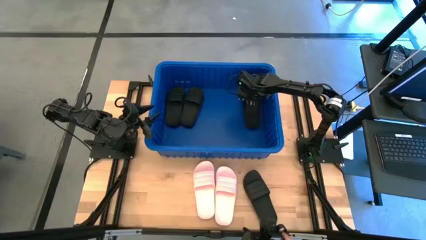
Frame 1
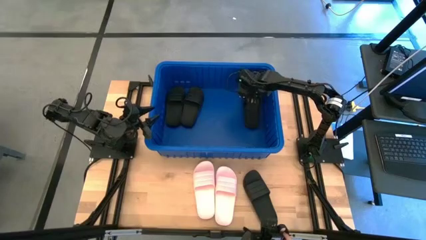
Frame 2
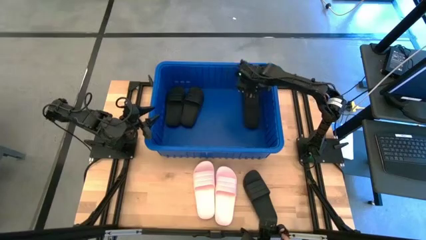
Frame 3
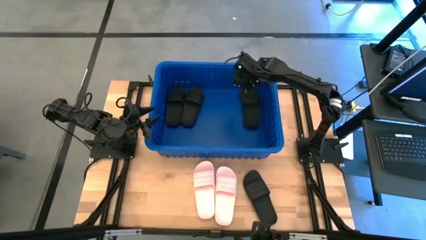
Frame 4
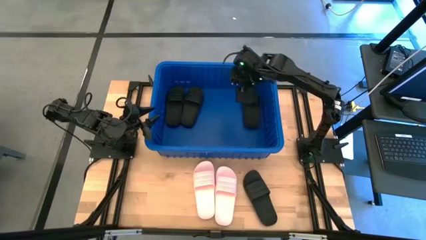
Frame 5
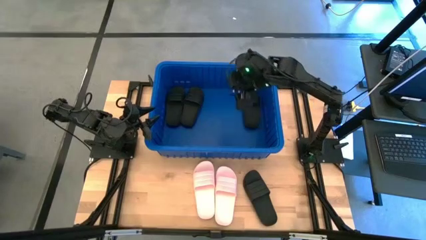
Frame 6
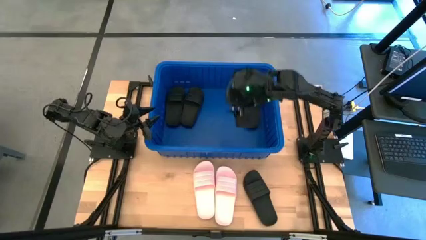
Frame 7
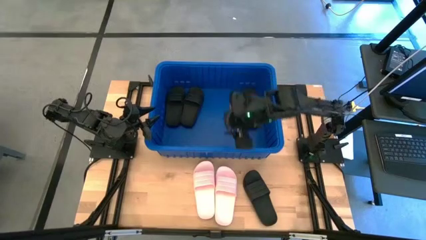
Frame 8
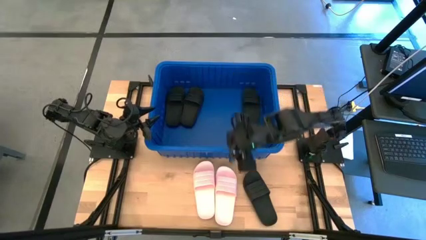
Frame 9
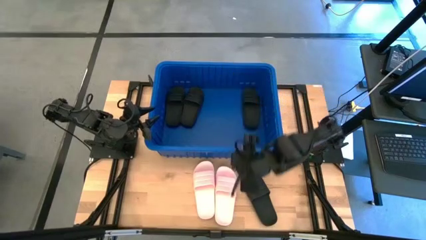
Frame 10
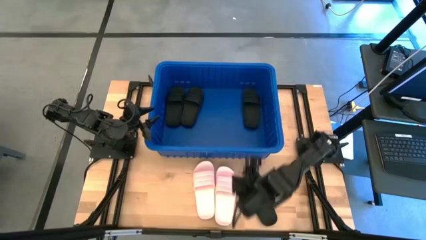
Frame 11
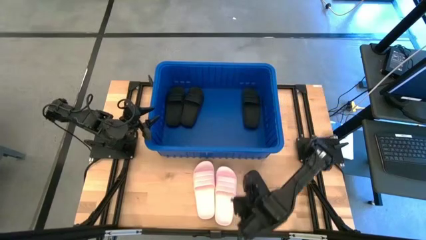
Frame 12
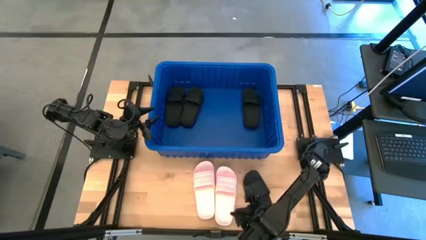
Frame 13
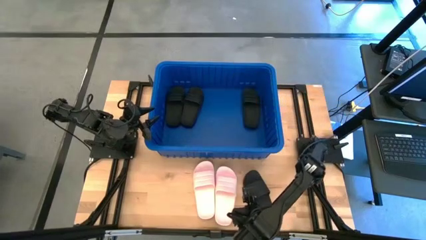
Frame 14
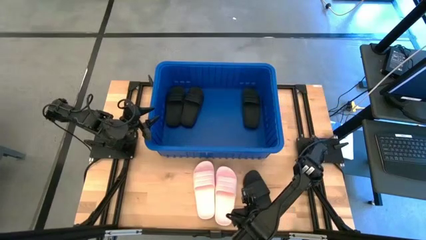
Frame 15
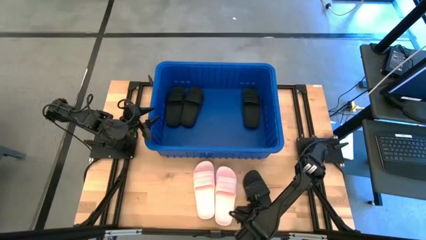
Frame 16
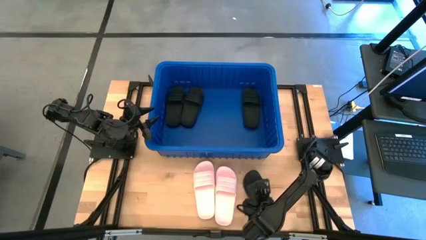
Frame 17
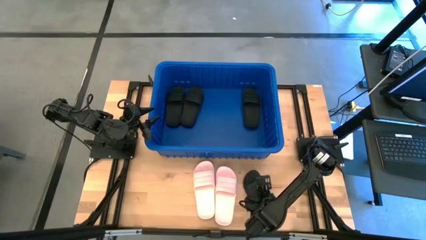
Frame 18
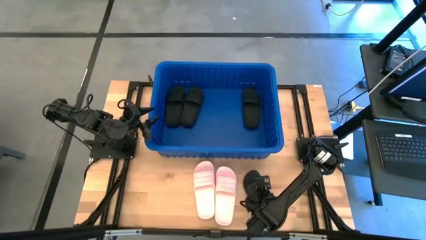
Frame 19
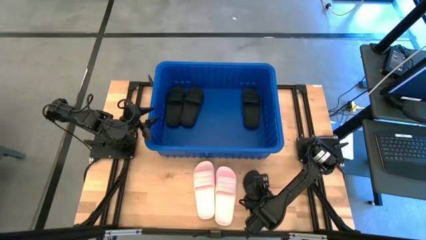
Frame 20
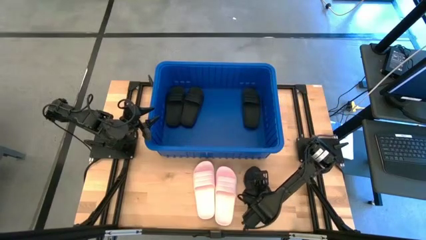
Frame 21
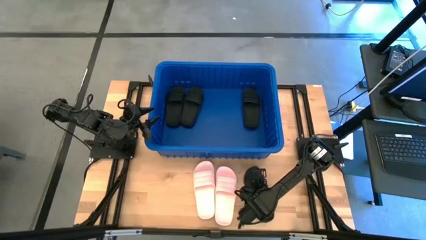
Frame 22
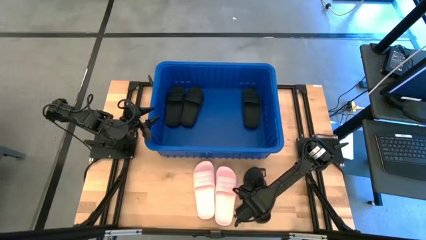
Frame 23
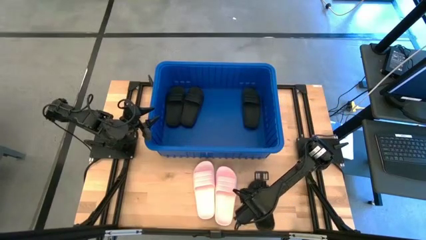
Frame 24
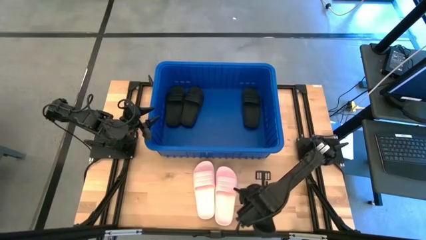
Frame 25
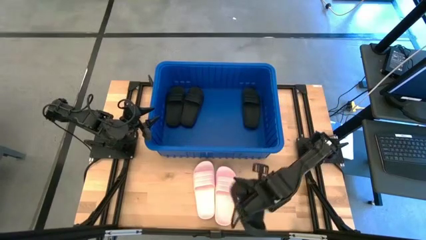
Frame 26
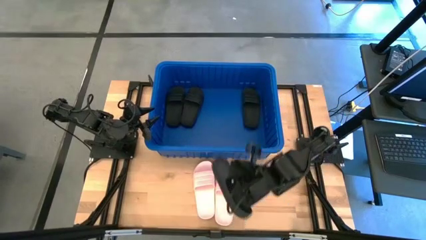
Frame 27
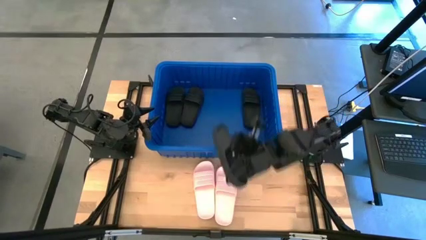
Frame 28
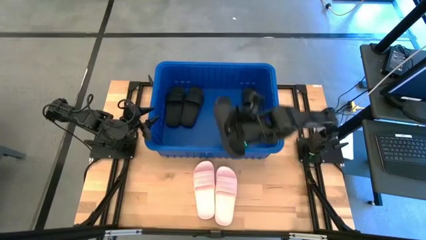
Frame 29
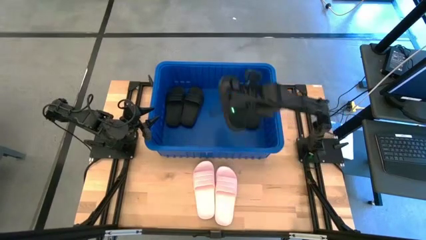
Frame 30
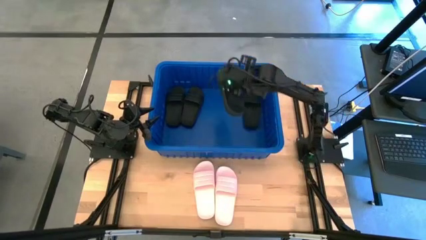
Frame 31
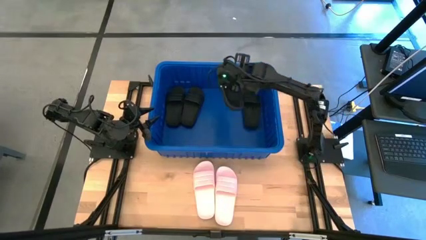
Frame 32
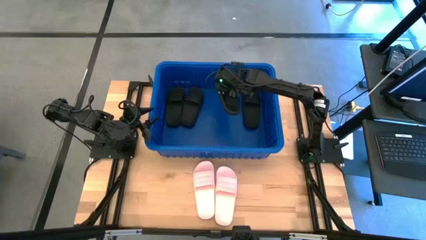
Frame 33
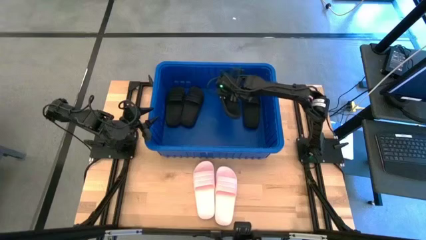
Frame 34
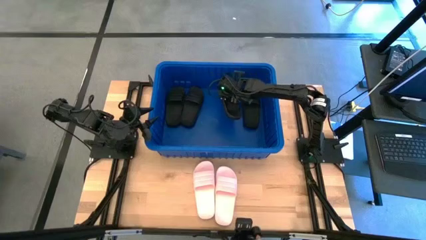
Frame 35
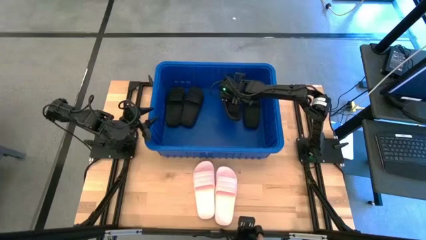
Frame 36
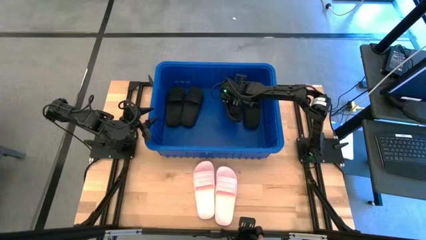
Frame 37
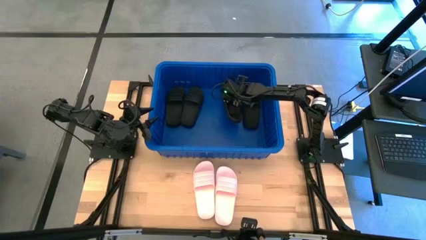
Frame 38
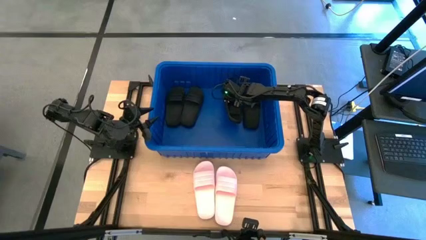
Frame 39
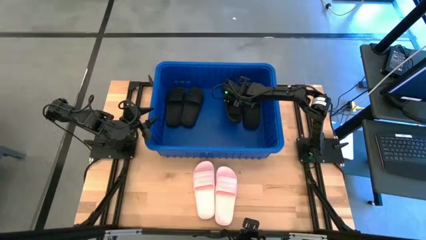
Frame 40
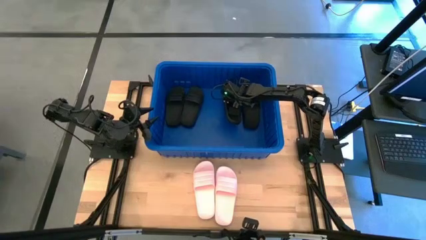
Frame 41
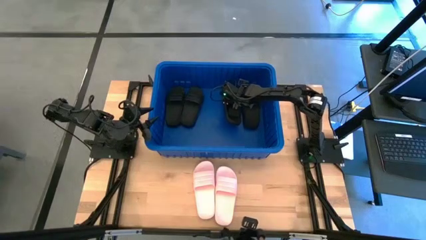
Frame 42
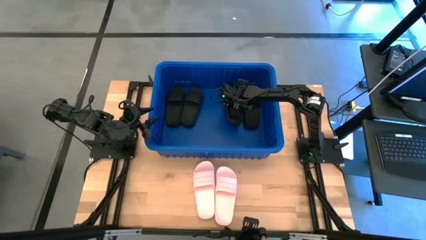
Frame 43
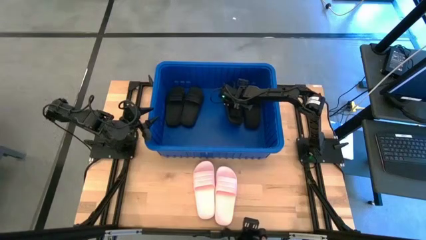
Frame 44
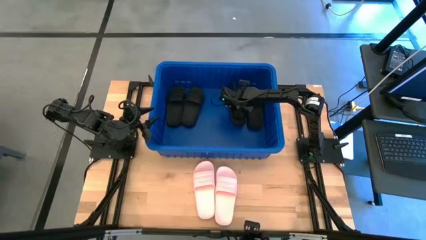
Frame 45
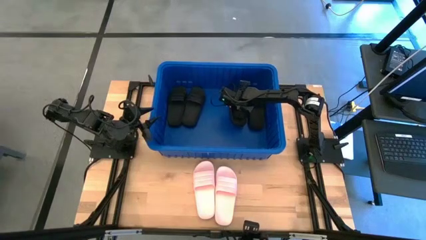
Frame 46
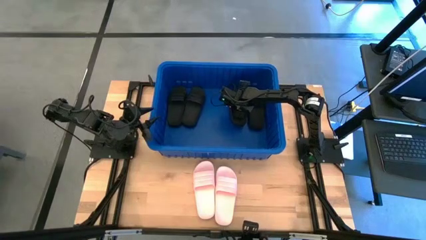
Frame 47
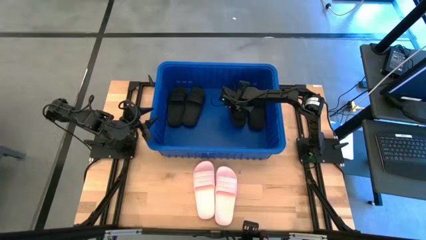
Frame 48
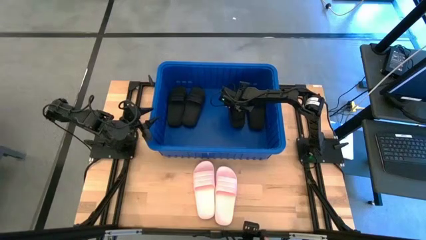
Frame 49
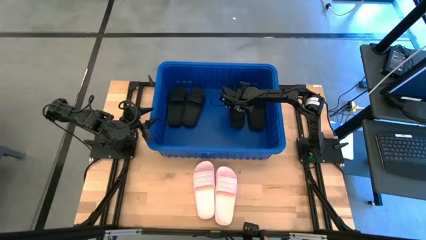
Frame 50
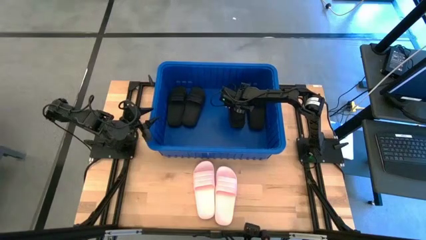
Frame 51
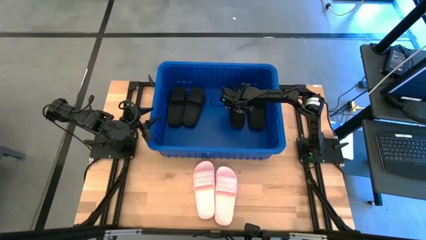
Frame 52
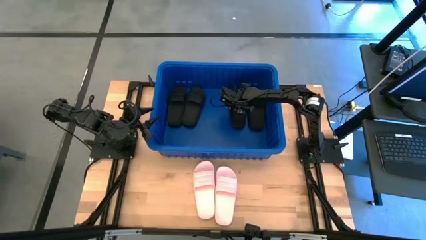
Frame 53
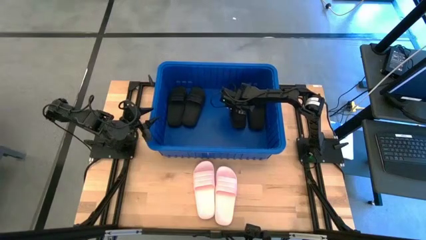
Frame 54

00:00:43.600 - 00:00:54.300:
Task: Pick and place slides into bin
Put the black slide into the blue bin

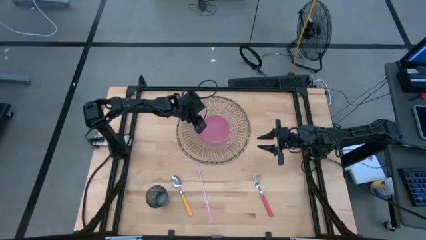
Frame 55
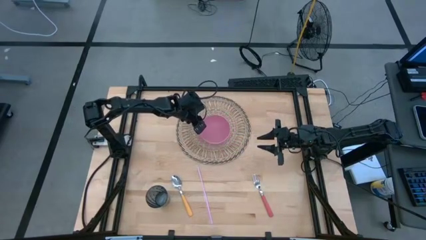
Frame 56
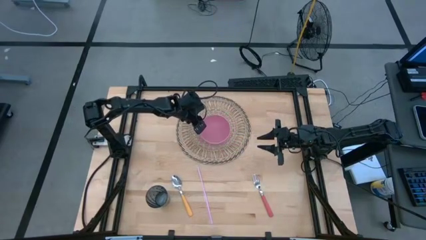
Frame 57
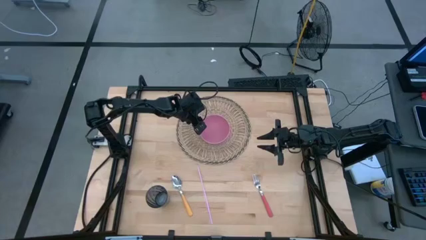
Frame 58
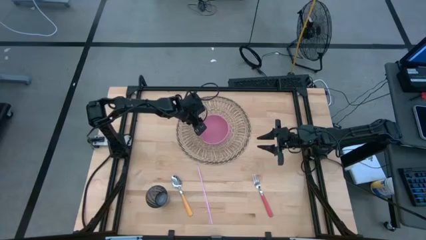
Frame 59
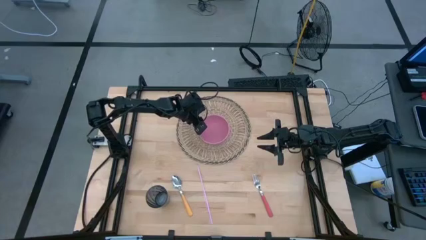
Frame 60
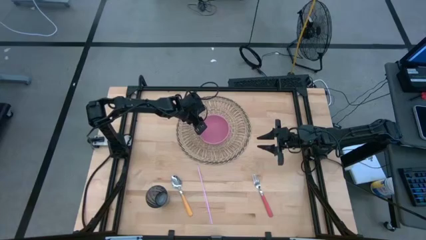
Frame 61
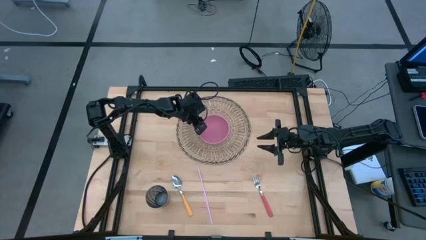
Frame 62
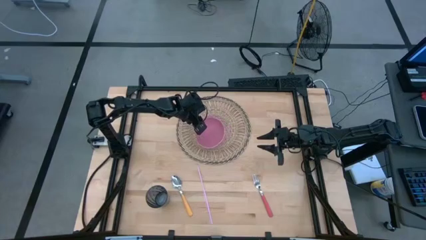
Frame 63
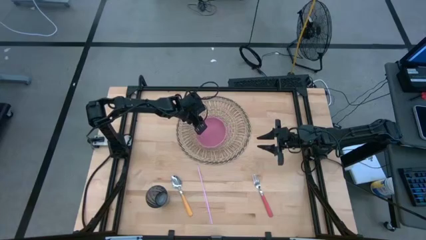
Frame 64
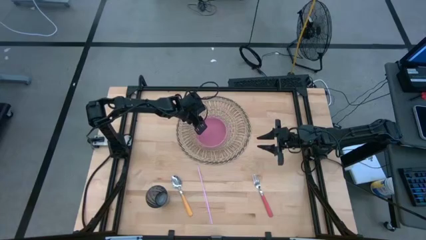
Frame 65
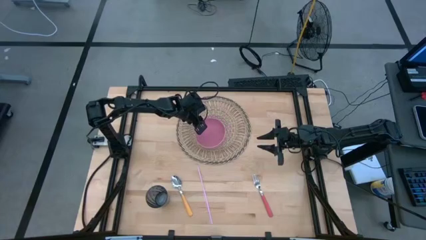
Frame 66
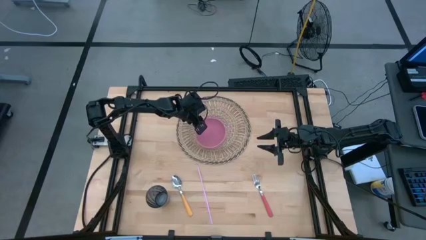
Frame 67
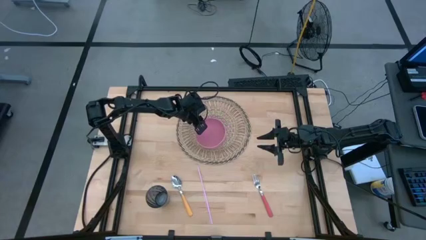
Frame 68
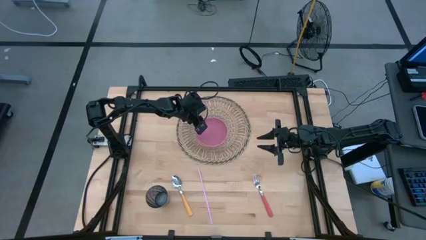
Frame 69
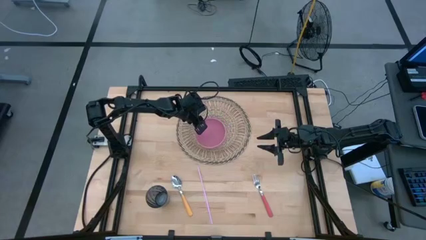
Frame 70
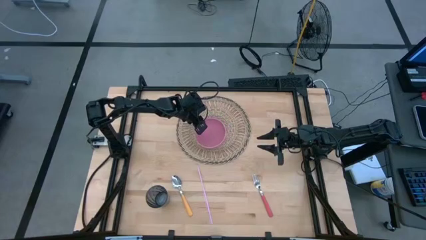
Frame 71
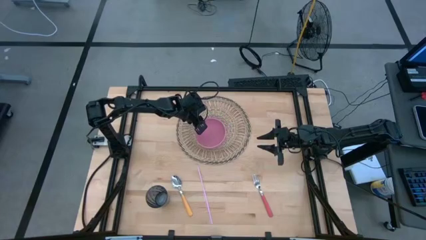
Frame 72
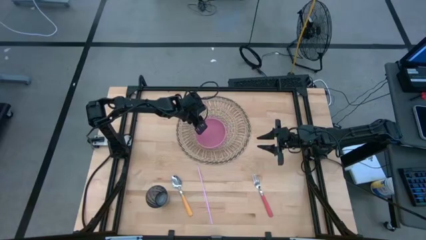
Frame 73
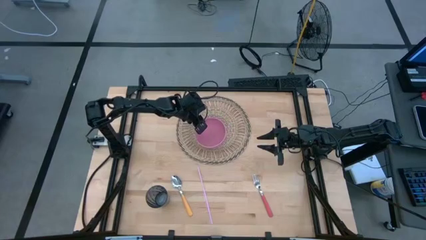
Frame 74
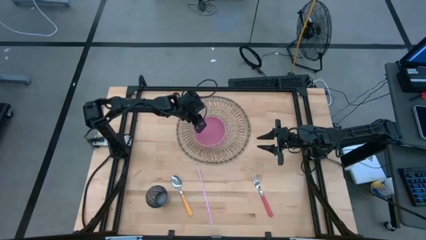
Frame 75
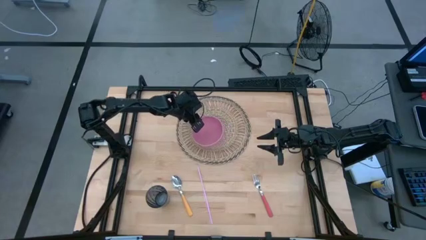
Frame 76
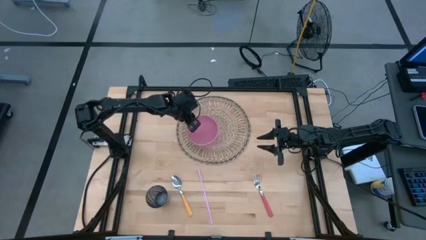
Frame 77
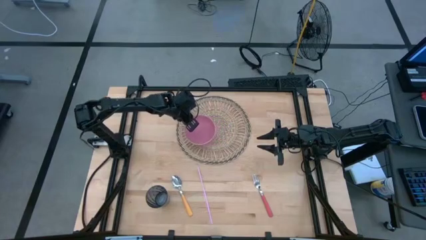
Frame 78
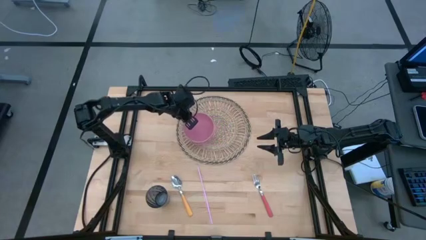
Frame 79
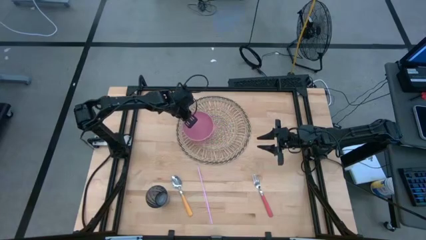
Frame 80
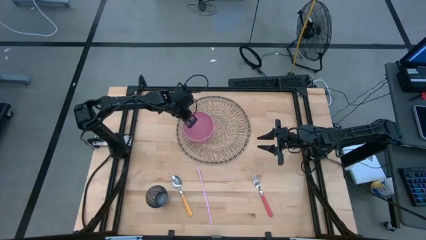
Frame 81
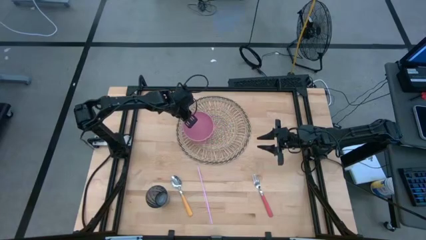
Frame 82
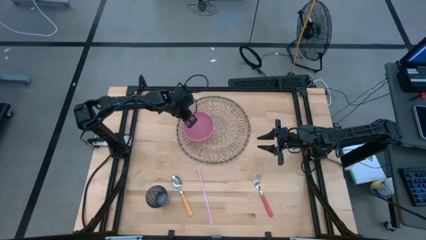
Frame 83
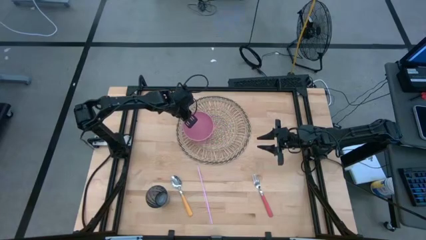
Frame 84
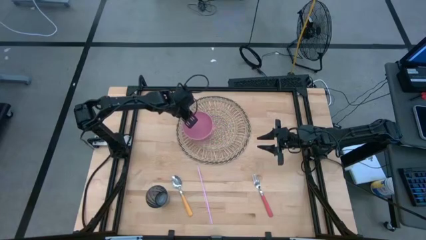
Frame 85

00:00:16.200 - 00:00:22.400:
Task: Pick & Place Utensil
Put the pink bowl on the middle left of the brown placemat
